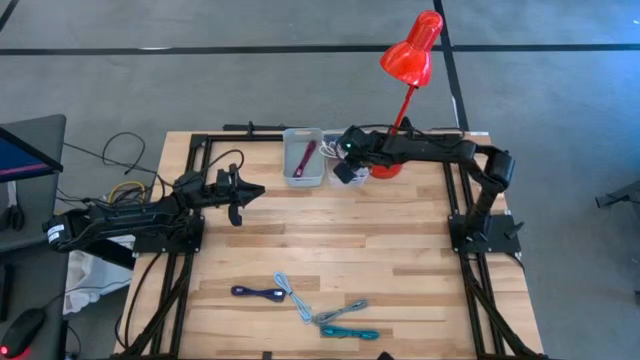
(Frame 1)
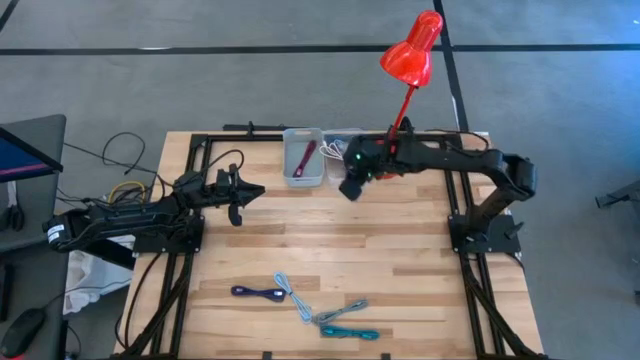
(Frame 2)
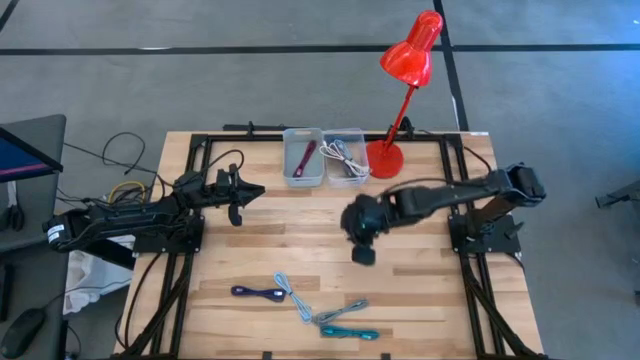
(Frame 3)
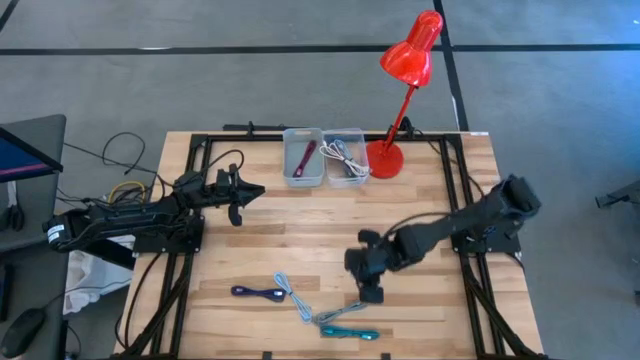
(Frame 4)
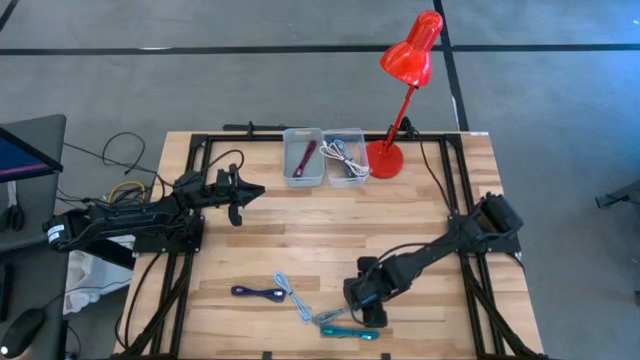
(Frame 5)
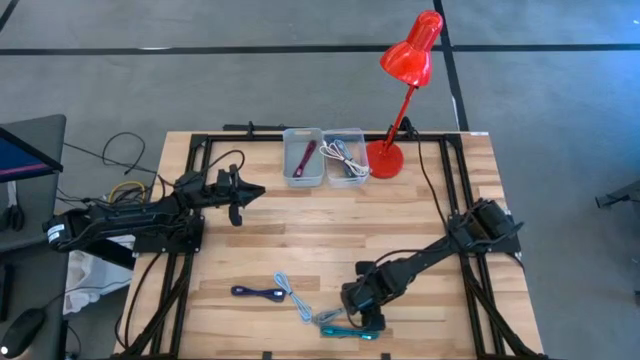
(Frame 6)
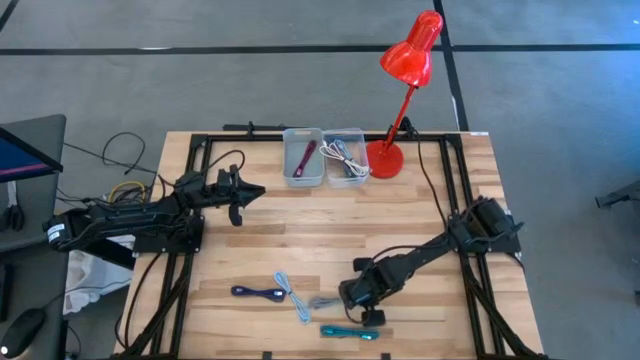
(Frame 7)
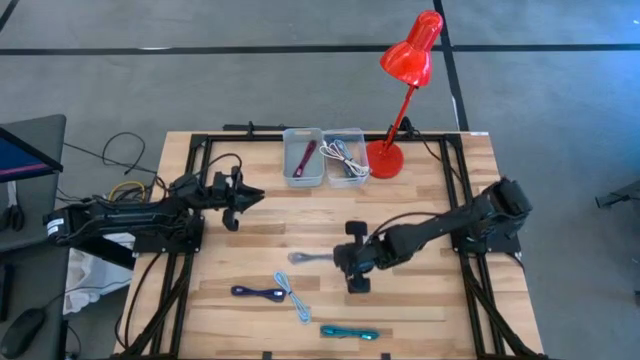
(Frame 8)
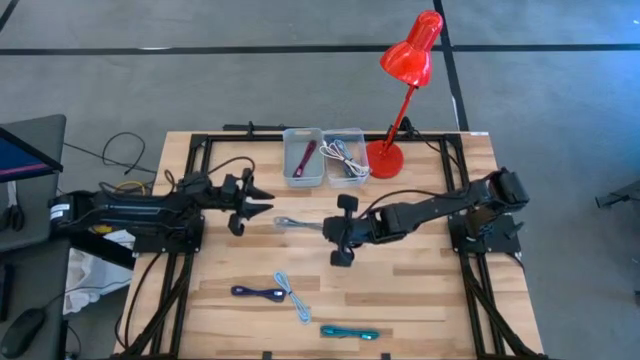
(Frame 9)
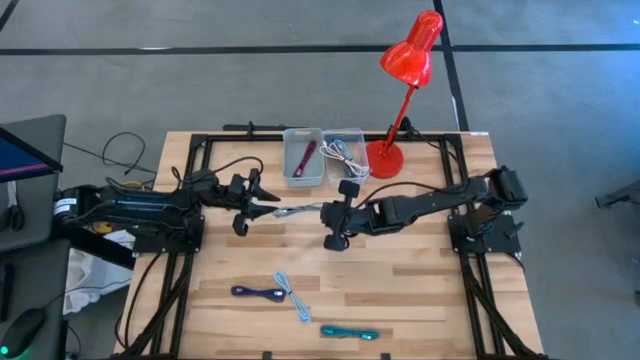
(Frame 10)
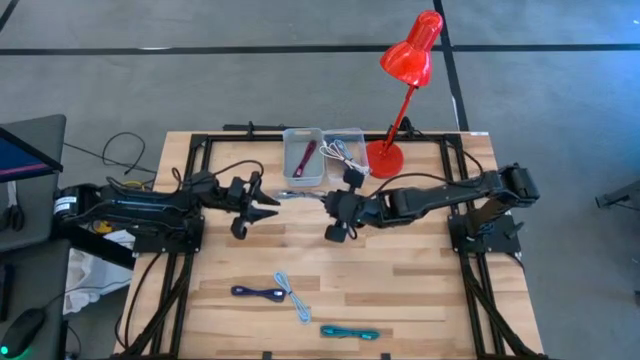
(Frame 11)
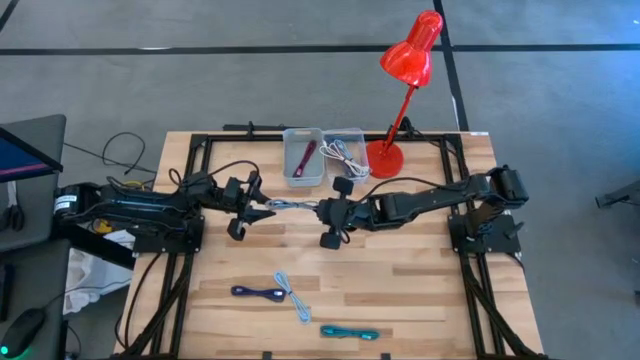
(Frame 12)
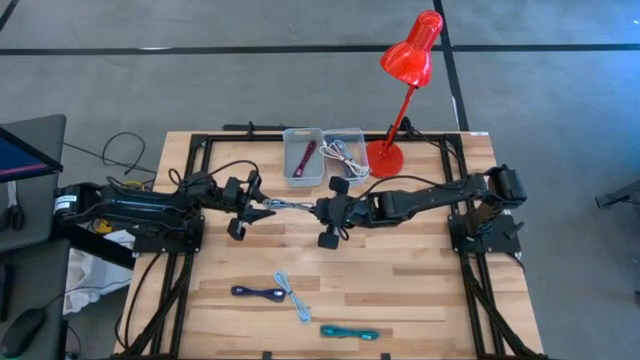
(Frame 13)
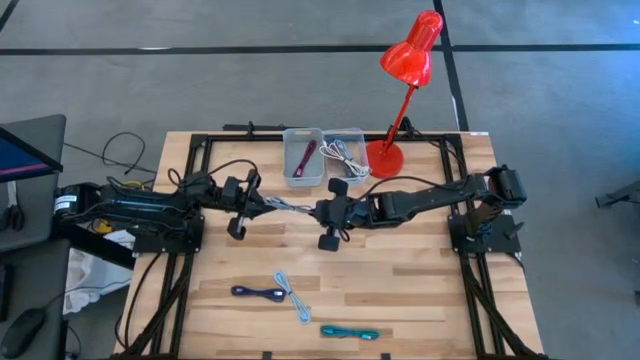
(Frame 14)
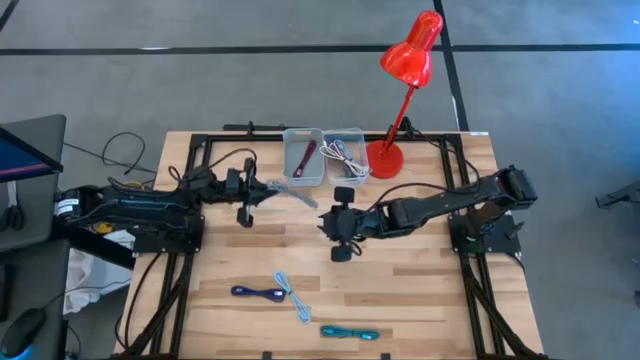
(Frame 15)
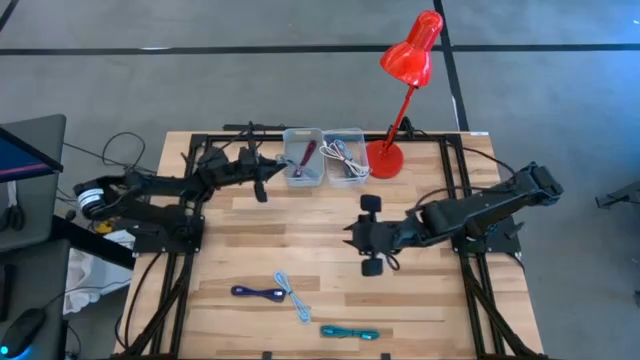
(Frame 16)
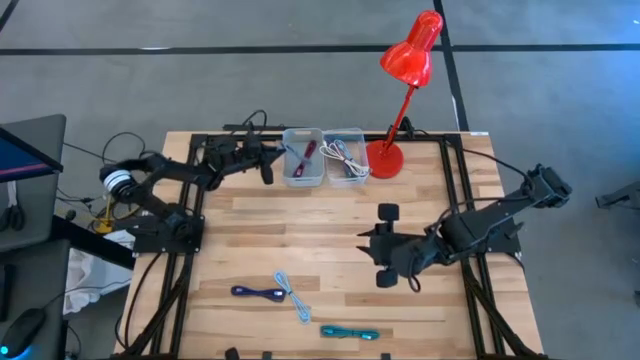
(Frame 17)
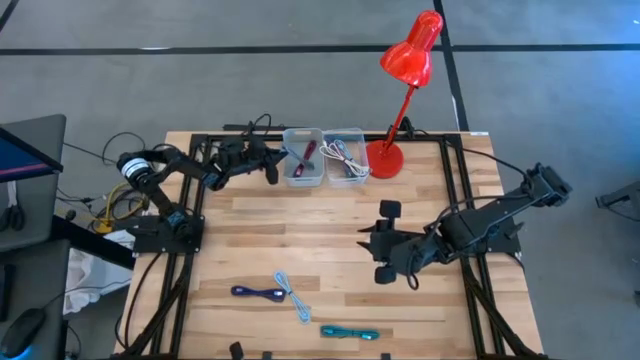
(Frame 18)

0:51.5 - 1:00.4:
Task: Pick & Place USB Port
Put the black and white charger cable into the gray bin

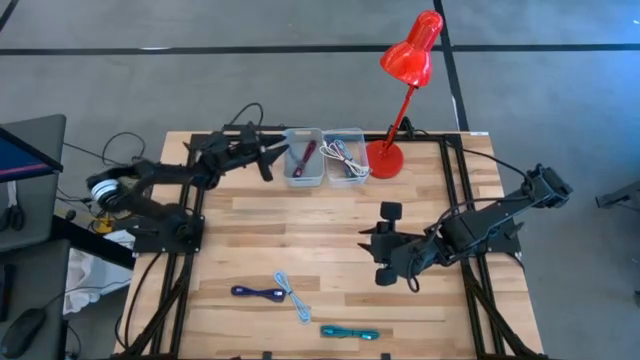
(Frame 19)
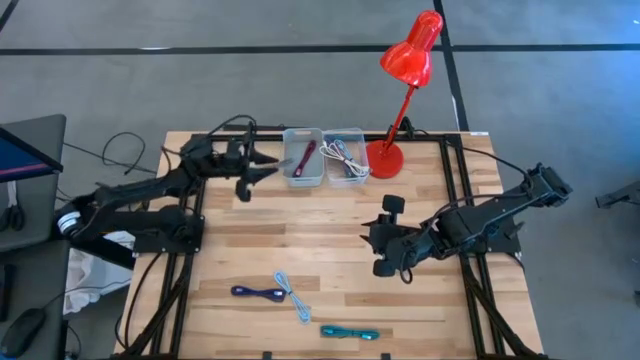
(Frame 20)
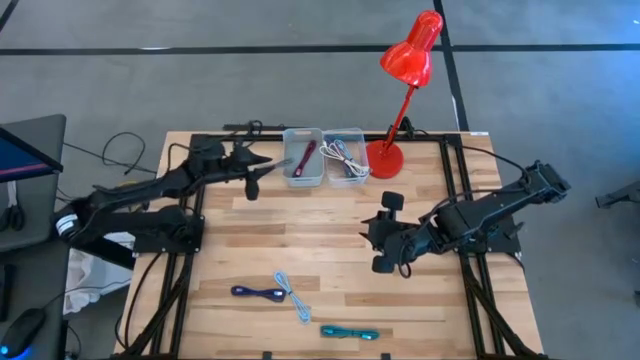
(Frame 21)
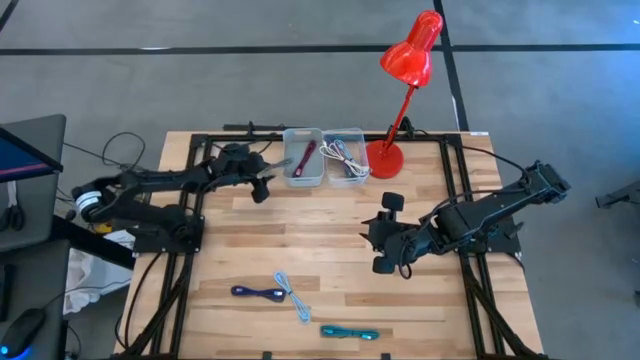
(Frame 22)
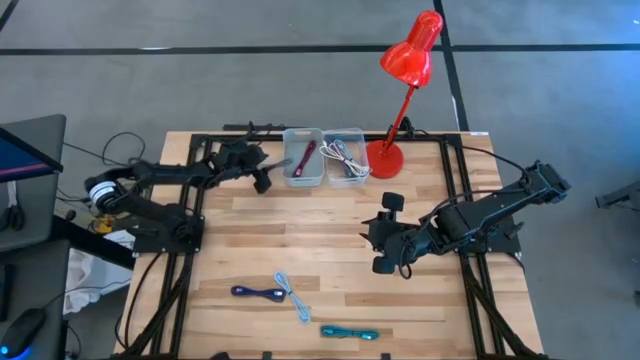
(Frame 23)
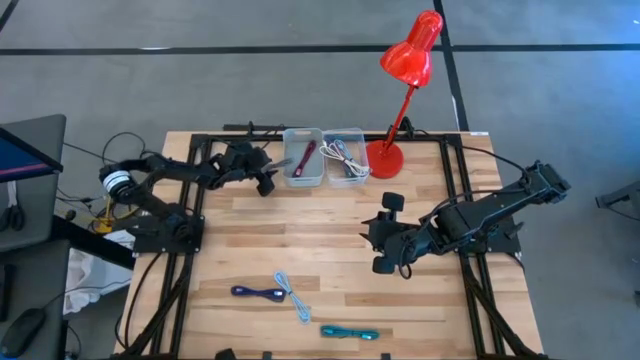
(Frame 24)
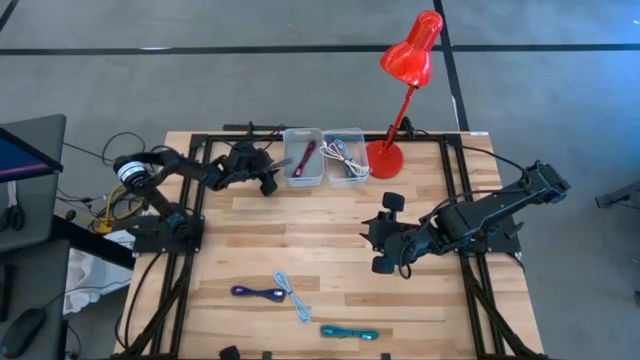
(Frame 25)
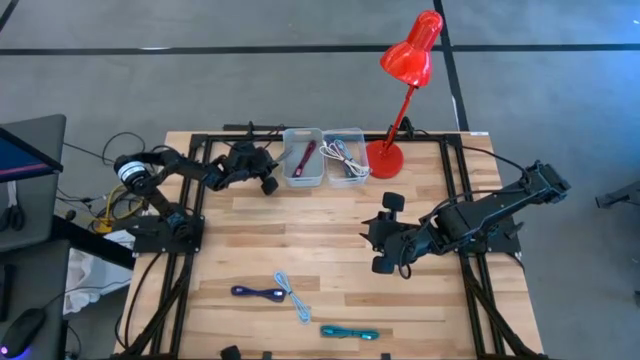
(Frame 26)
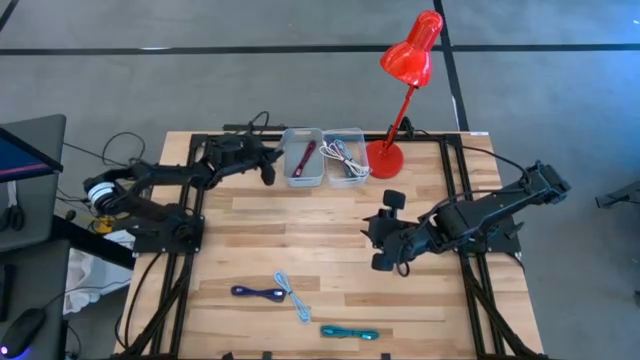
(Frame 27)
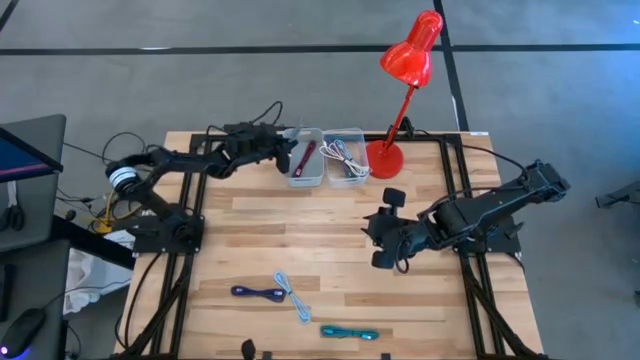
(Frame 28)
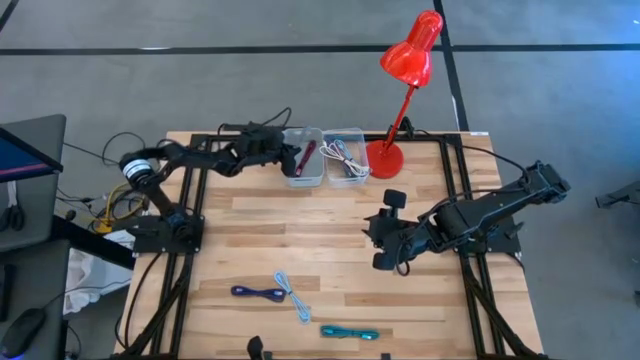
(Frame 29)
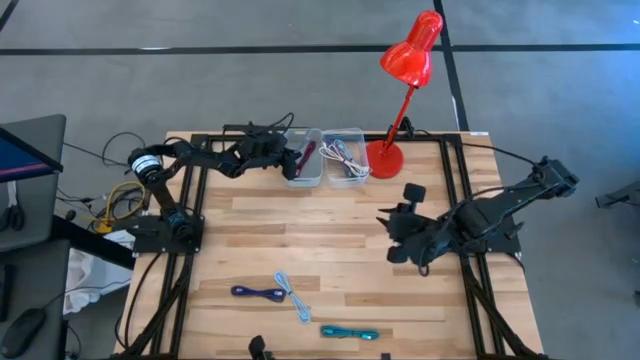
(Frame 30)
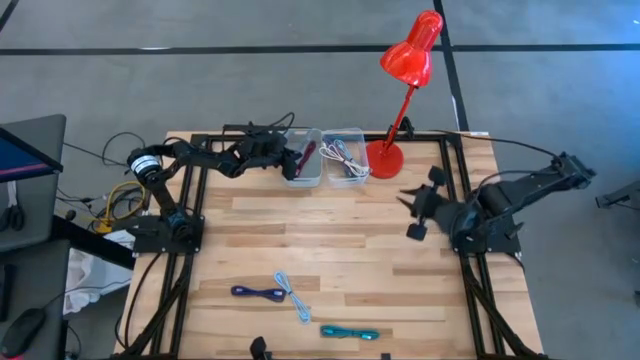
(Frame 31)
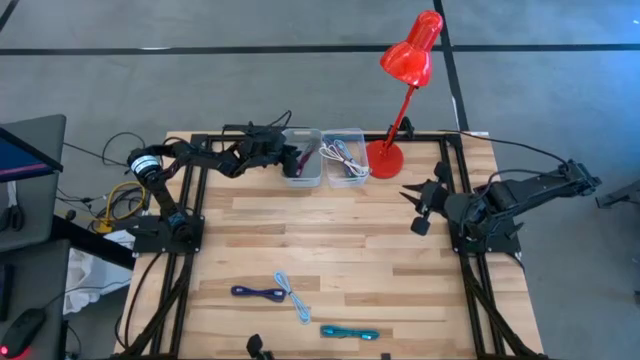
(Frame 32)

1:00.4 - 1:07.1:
Put the black and white charger cable into the gray bin

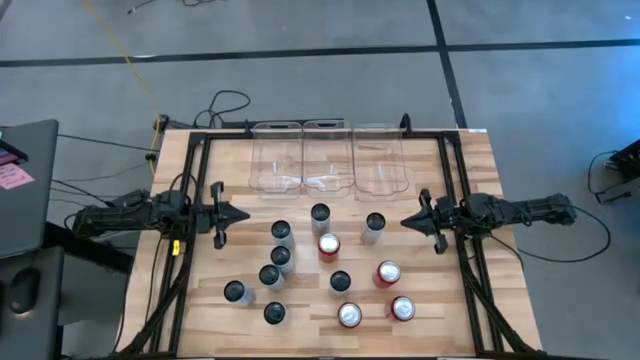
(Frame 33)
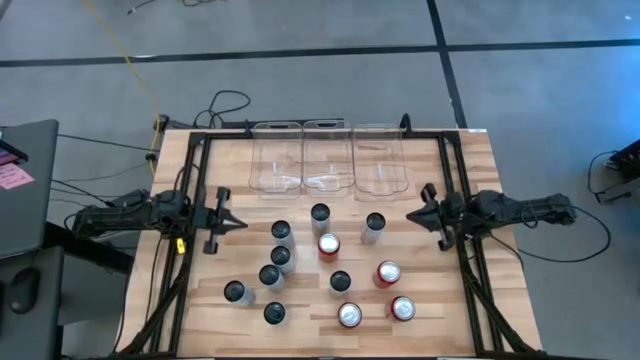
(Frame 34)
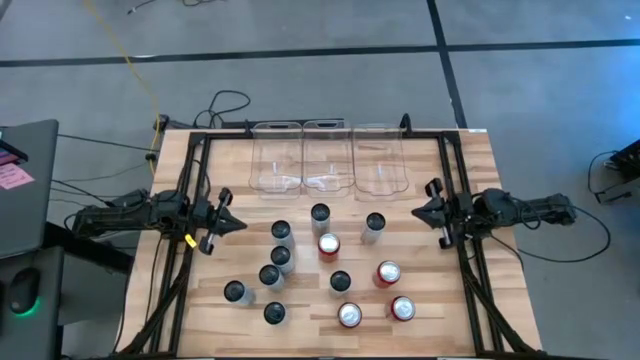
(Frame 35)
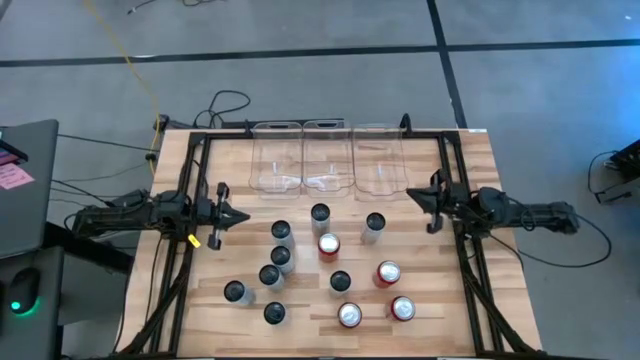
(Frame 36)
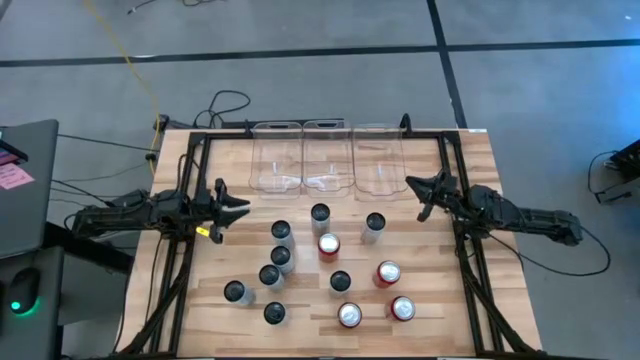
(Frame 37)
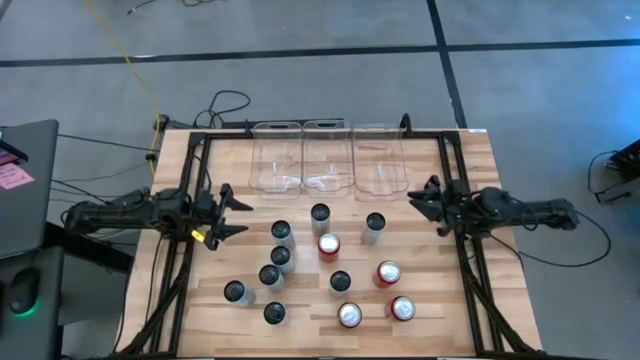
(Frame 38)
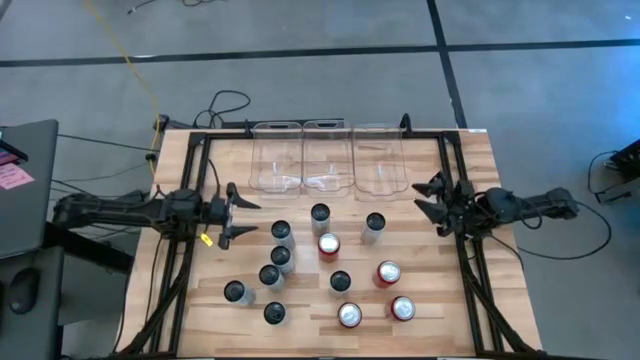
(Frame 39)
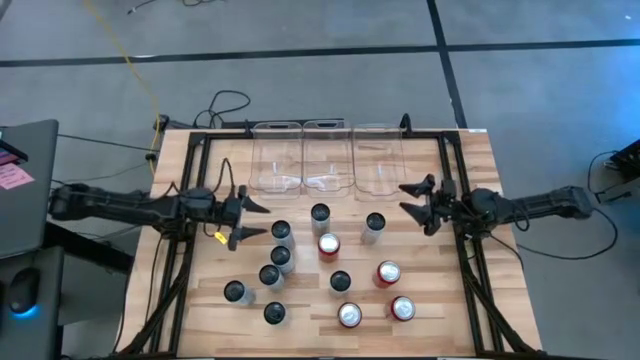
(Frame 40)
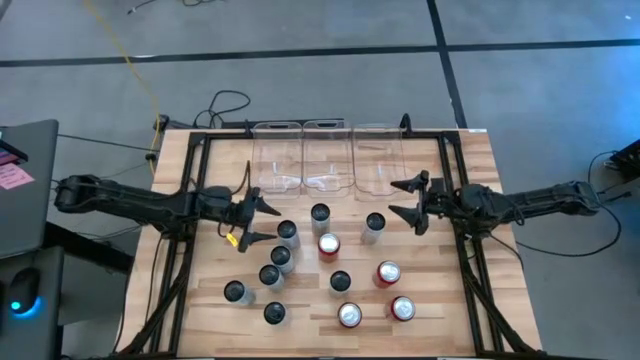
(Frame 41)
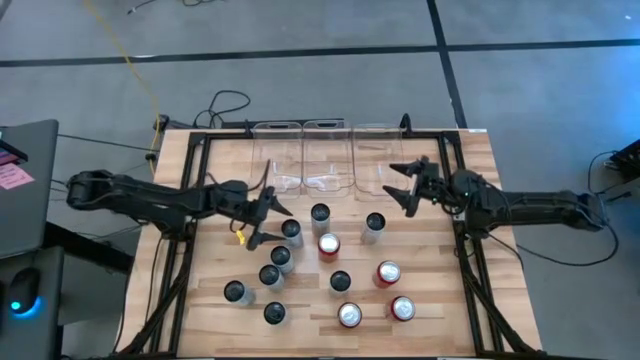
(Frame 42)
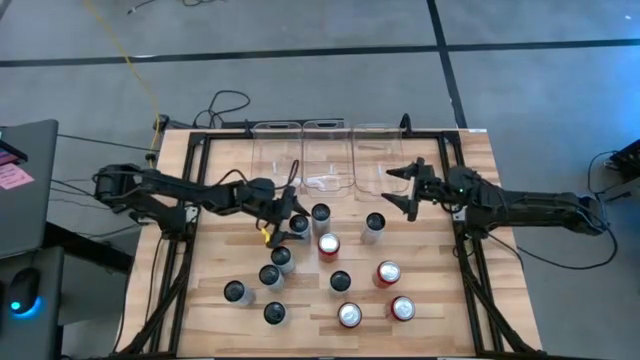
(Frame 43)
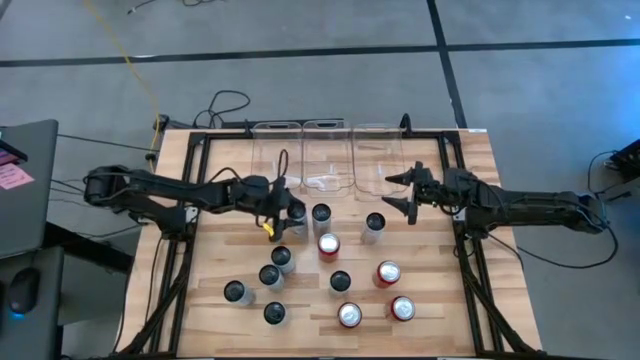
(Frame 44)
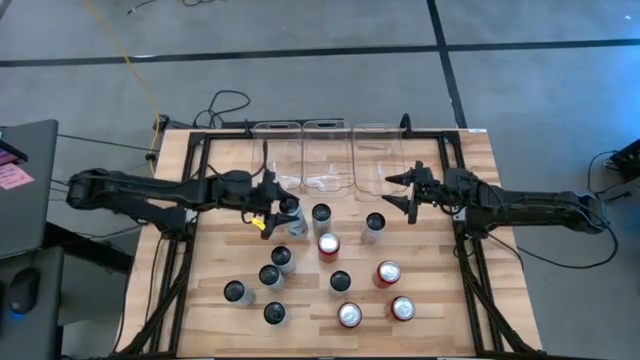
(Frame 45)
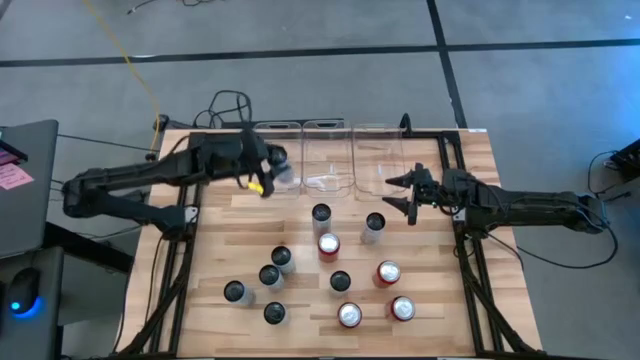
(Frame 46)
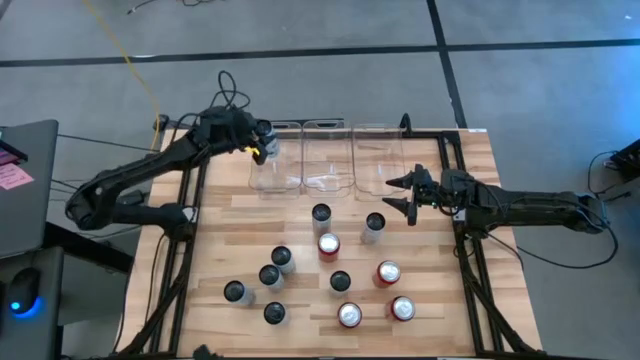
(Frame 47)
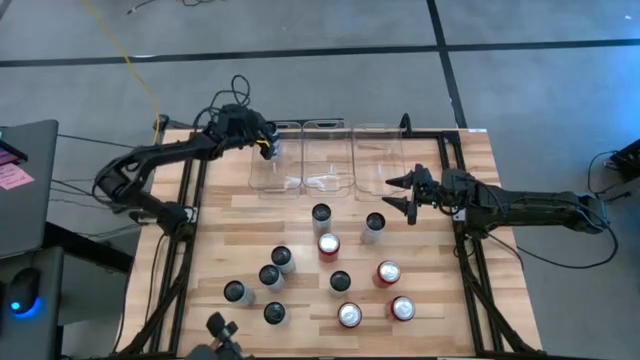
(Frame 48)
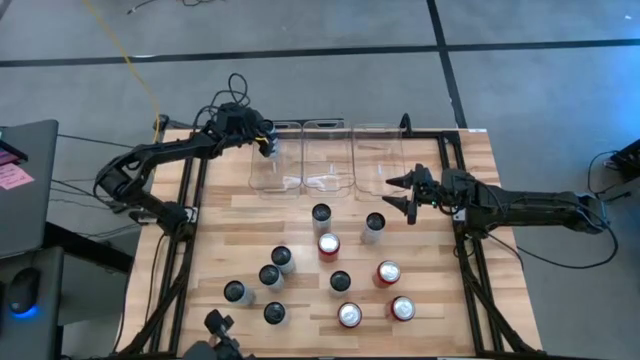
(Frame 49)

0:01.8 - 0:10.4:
Task: Sort soda cans
Put the white-blue soda can into the left transparent bin
